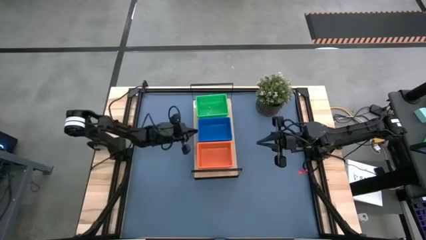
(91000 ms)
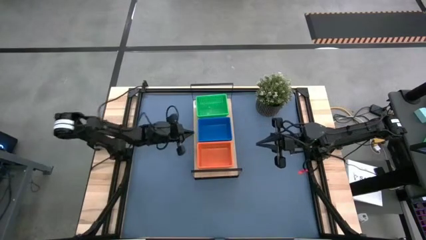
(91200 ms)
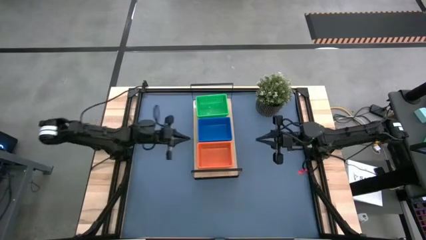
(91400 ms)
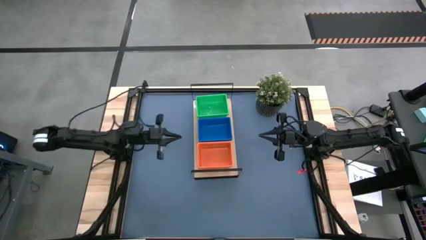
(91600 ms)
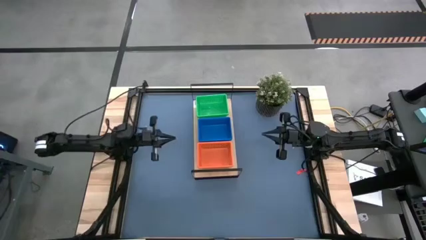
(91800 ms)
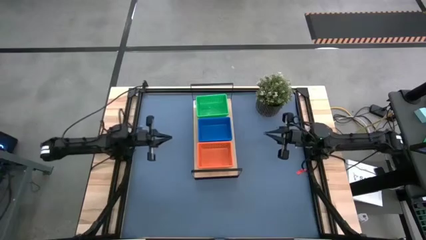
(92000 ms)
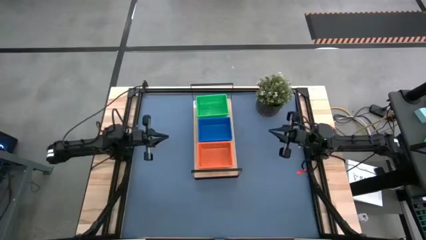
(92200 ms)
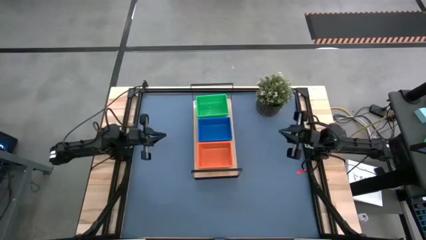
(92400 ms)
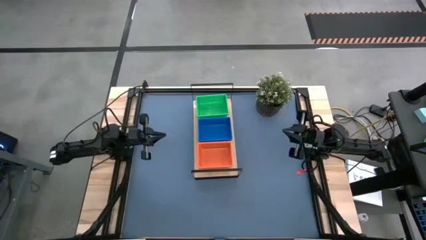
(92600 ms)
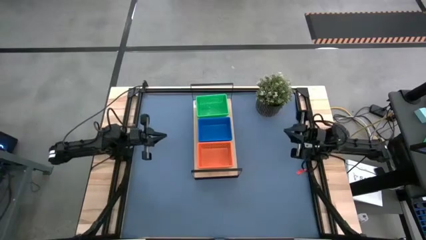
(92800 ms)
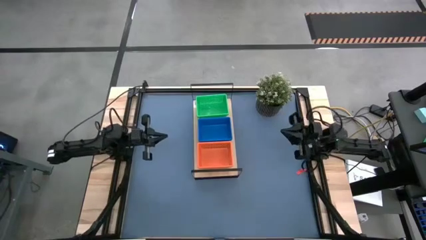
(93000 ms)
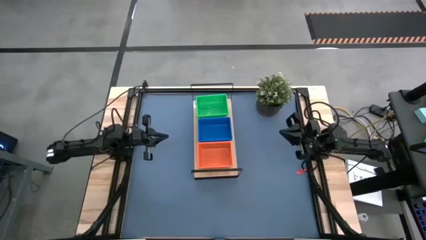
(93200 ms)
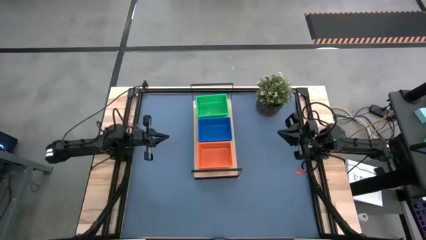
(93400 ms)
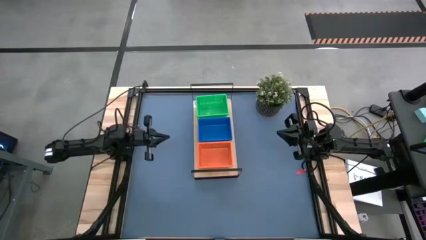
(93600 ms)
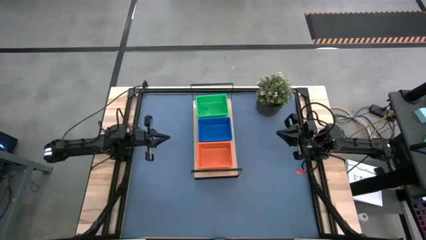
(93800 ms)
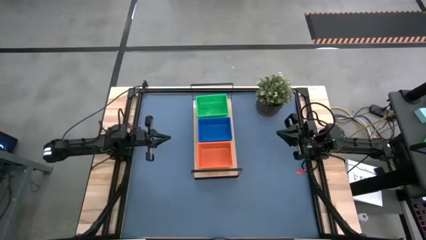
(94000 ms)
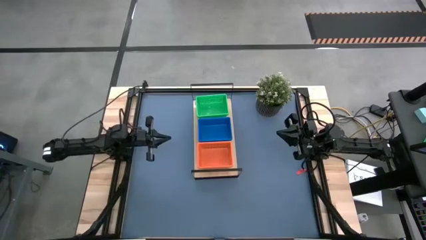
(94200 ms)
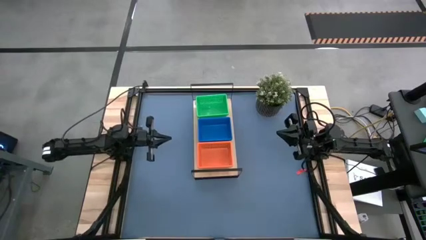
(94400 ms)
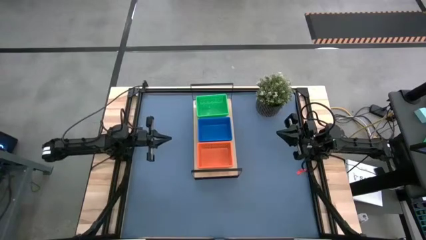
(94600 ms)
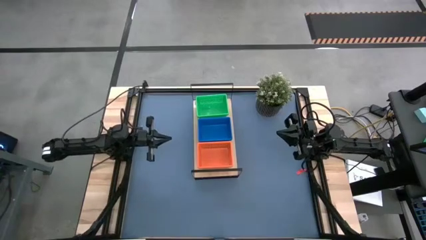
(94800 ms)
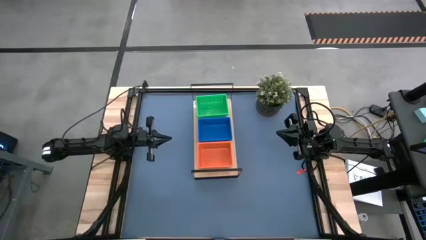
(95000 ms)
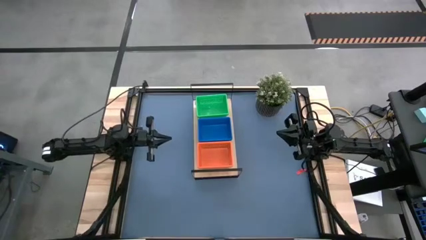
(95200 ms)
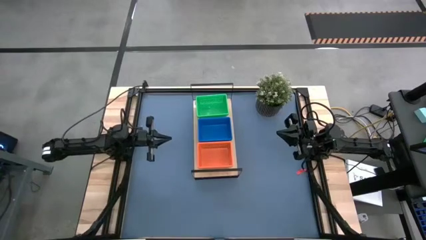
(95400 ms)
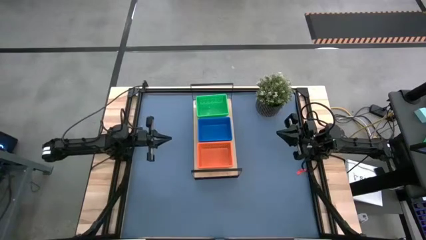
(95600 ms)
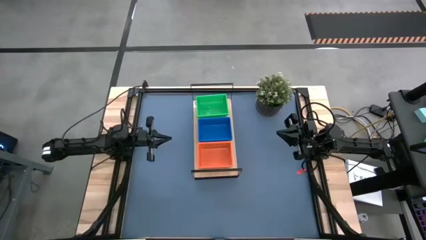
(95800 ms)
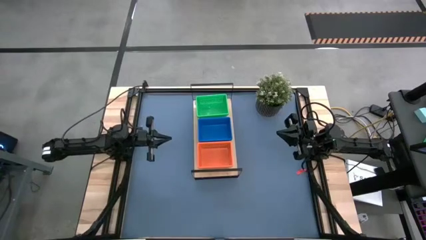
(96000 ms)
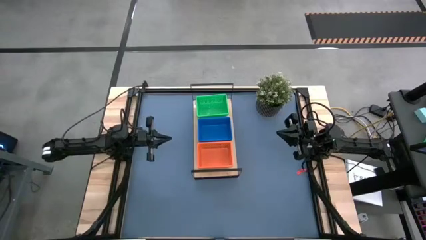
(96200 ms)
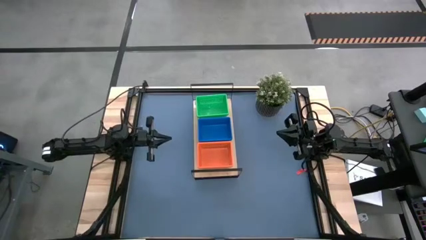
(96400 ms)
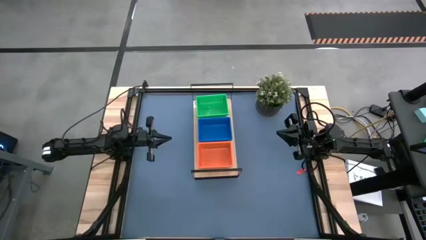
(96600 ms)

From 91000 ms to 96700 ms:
Task: Stack baskets on shelf by color
Return to Home Position
